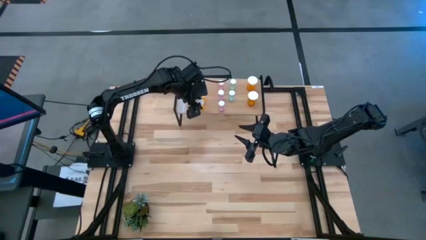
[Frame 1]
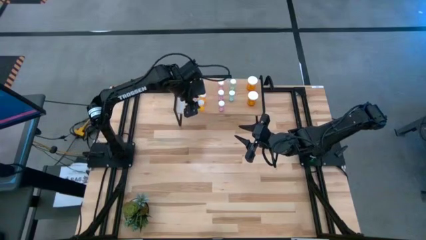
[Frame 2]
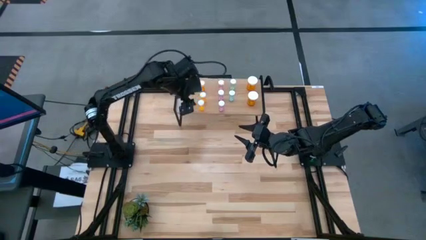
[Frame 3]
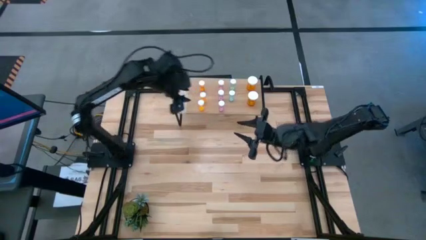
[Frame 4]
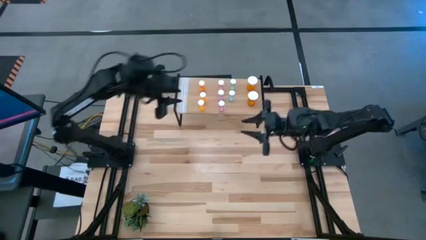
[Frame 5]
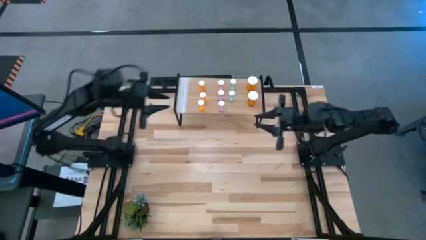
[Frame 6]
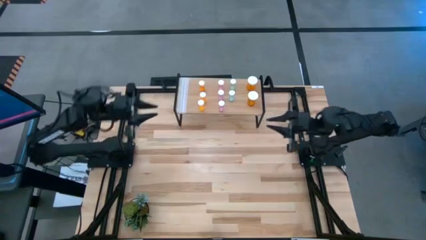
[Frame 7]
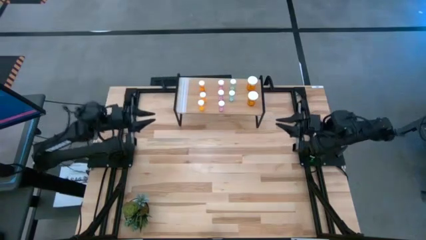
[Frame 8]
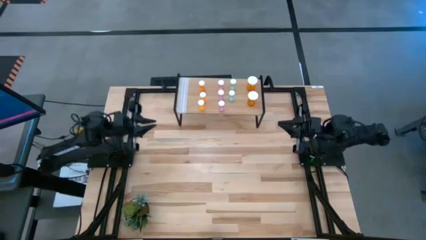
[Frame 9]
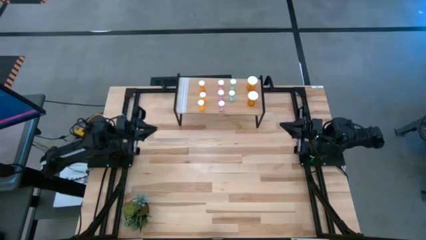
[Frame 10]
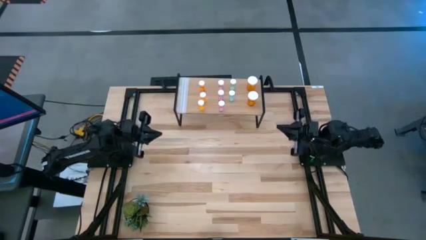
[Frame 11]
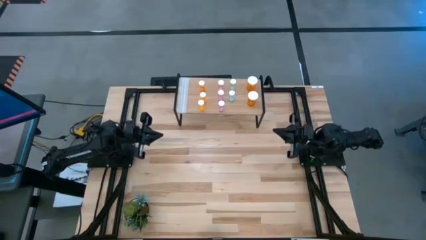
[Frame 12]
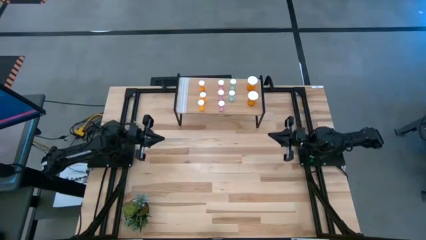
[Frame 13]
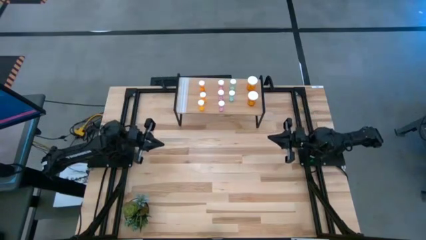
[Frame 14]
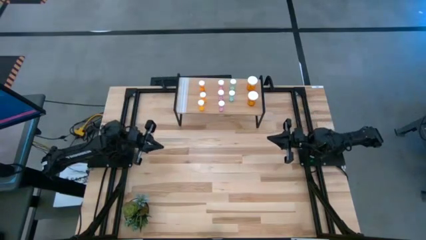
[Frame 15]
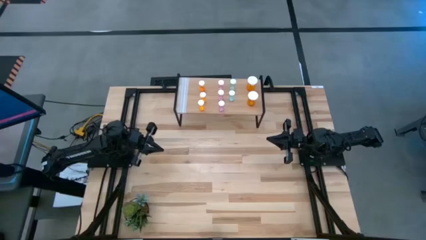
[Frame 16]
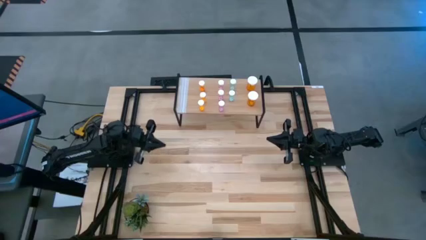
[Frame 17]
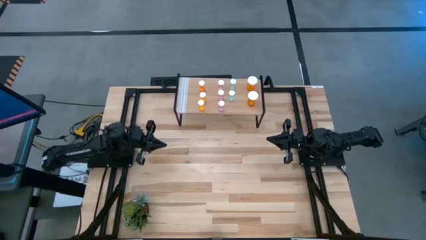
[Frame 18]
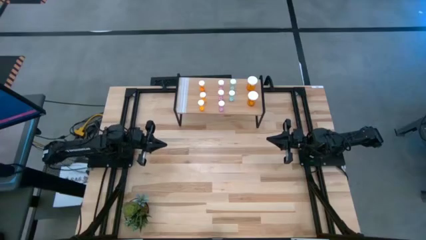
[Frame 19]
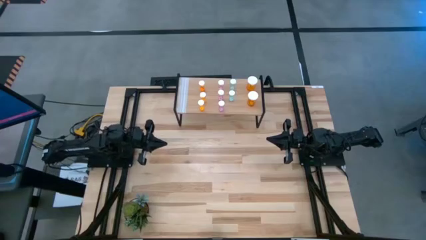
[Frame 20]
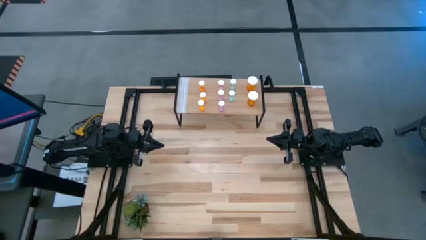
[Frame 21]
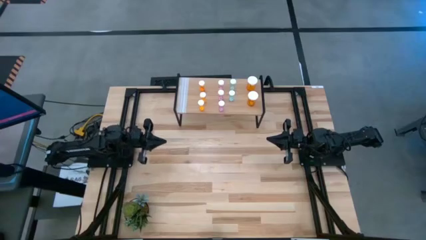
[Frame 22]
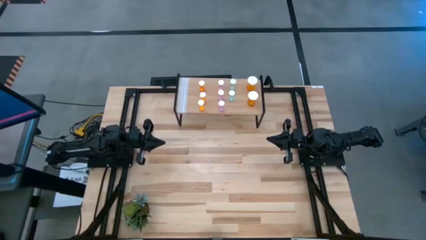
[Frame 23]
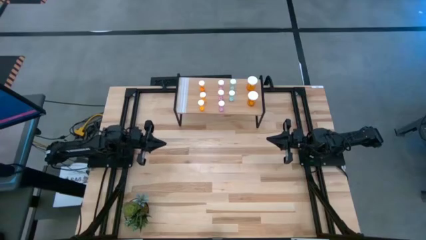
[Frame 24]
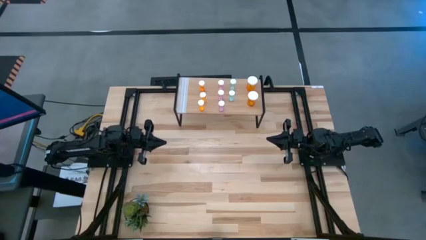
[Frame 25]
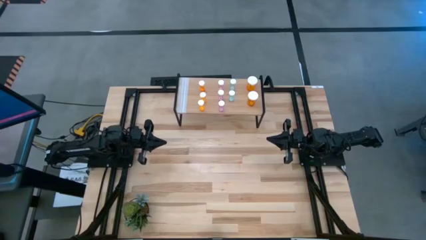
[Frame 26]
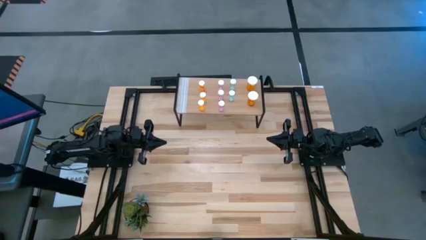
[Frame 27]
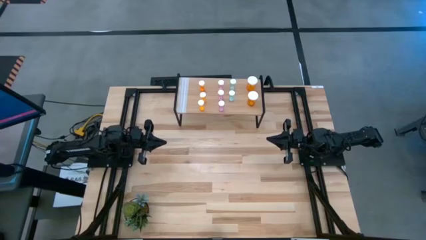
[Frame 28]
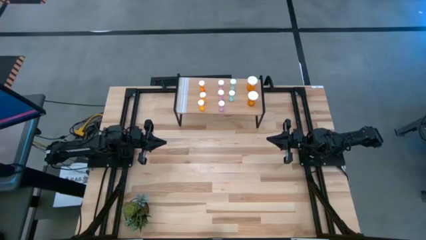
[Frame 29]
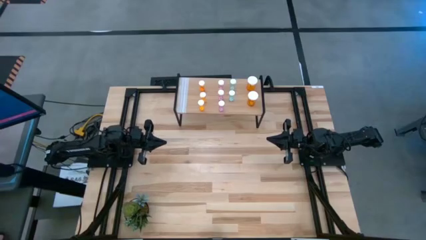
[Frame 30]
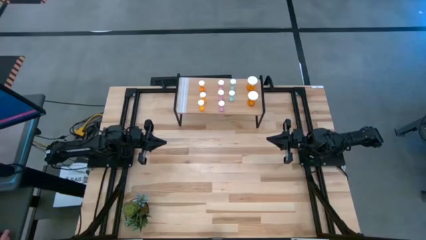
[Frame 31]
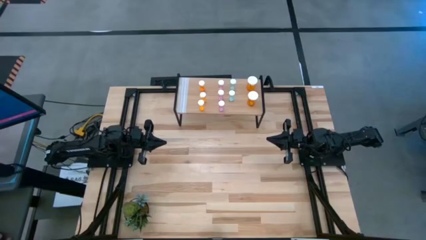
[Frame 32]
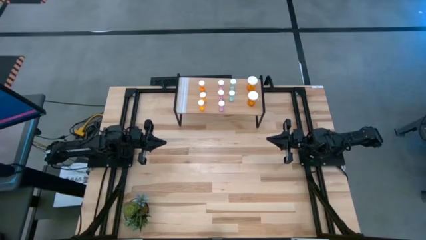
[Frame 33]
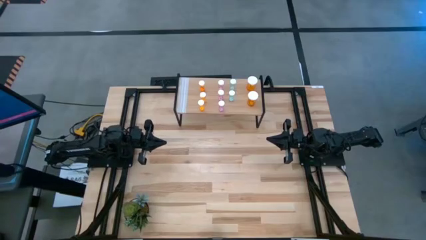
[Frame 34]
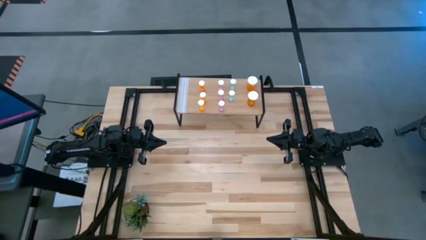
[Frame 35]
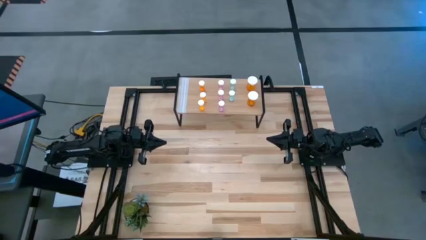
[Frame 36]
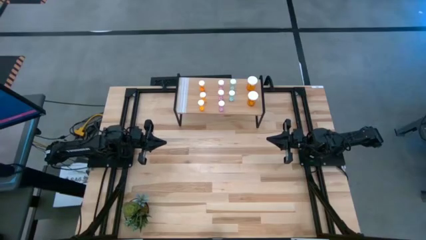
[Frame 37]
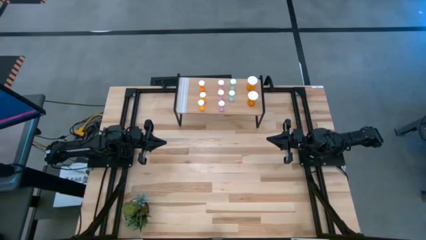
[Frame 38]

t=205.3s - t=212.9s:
Task: Pick and place medicine bottles onto shelf by color
Return to Home Position

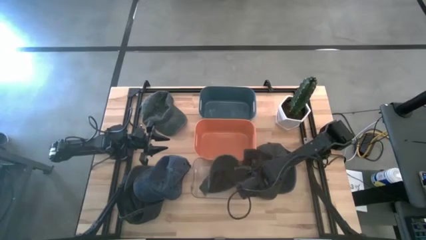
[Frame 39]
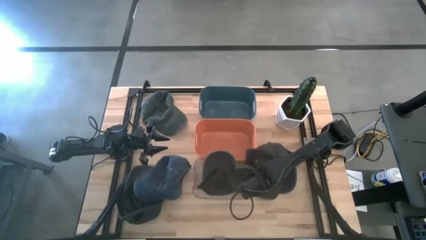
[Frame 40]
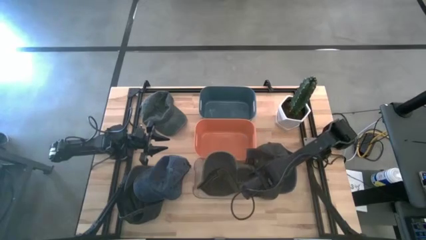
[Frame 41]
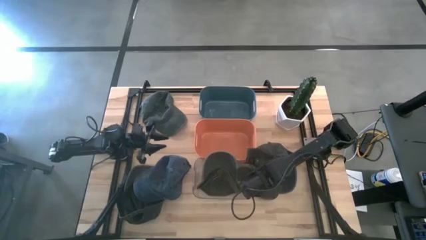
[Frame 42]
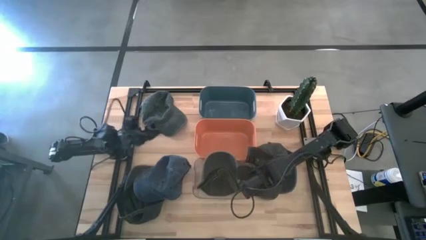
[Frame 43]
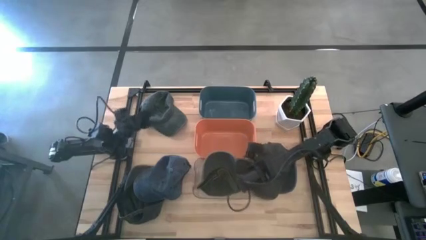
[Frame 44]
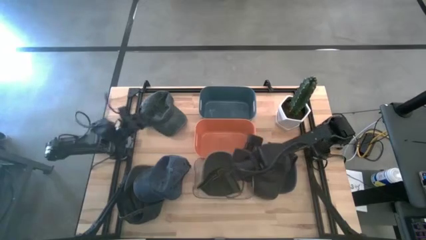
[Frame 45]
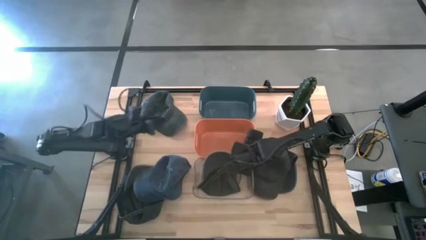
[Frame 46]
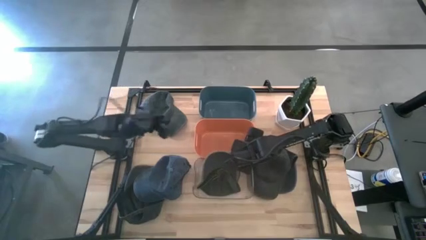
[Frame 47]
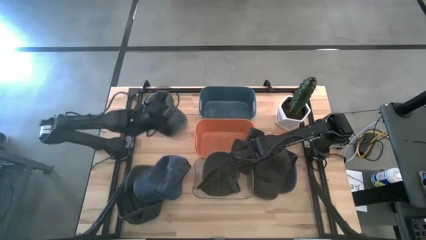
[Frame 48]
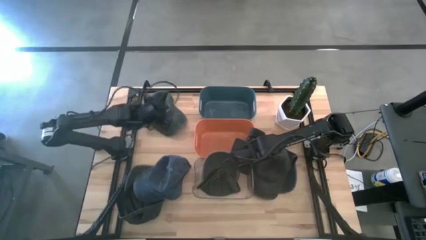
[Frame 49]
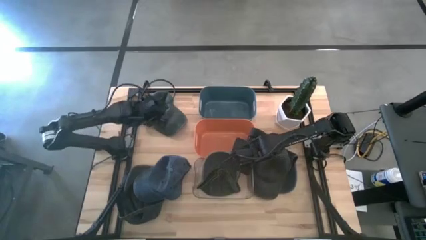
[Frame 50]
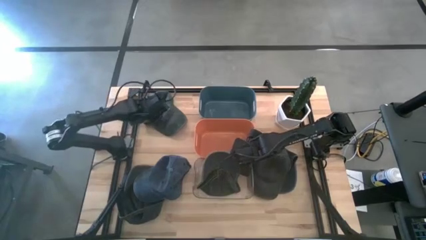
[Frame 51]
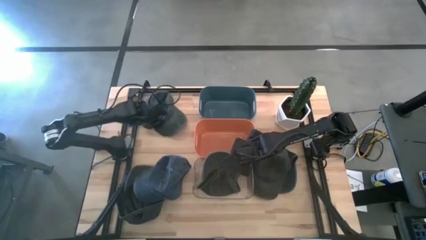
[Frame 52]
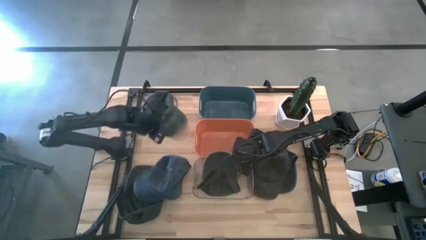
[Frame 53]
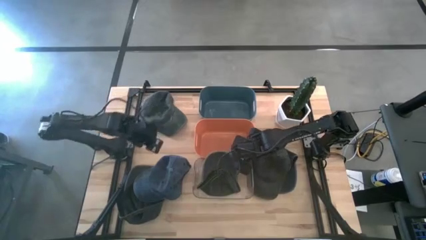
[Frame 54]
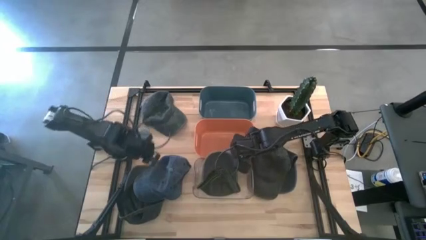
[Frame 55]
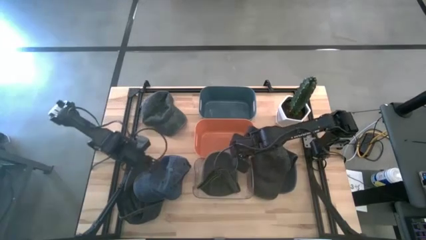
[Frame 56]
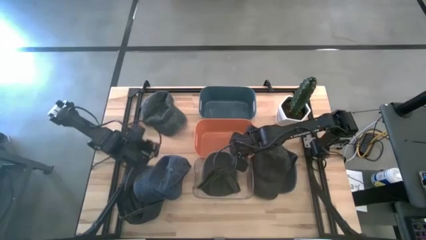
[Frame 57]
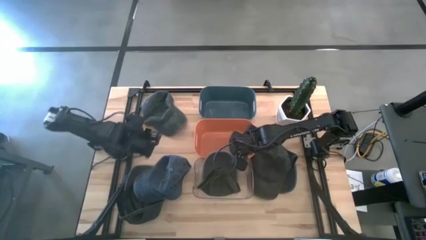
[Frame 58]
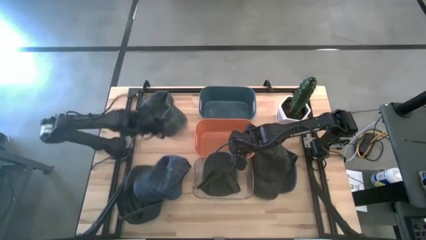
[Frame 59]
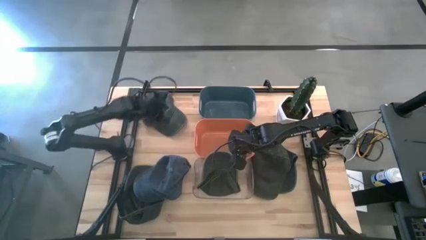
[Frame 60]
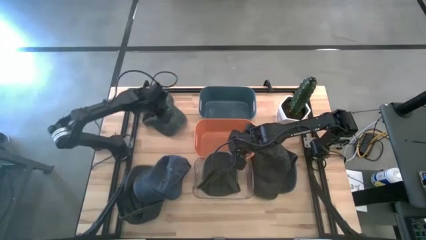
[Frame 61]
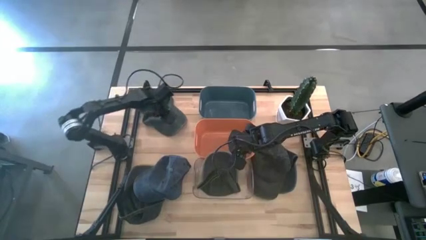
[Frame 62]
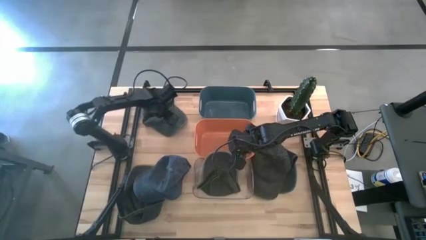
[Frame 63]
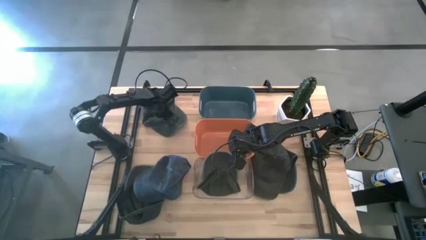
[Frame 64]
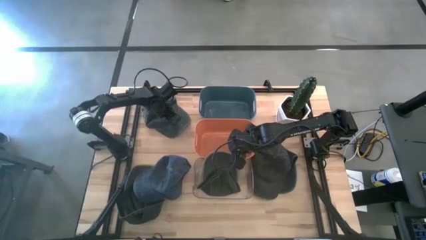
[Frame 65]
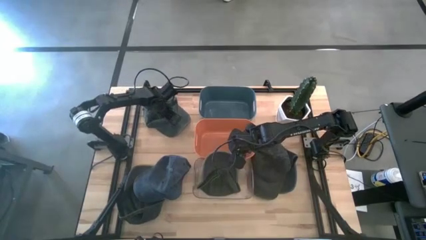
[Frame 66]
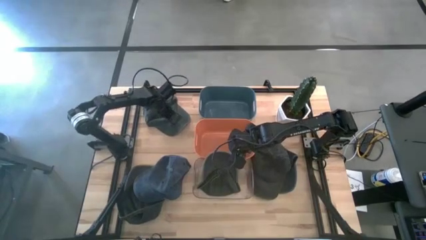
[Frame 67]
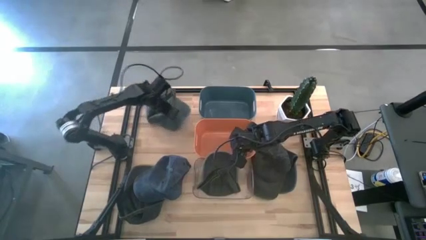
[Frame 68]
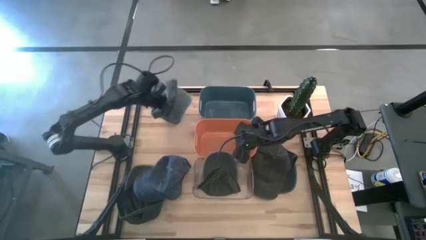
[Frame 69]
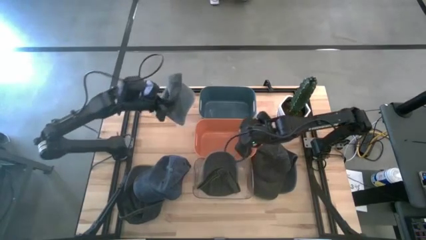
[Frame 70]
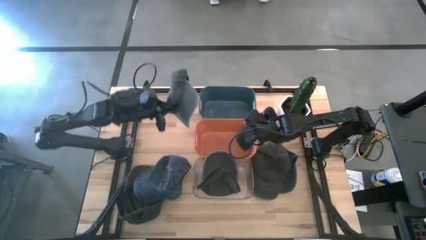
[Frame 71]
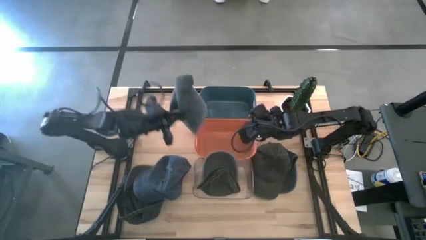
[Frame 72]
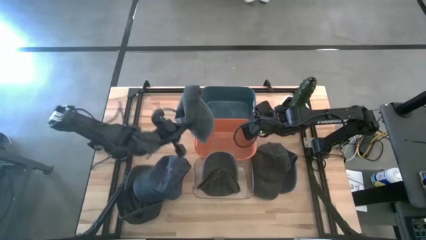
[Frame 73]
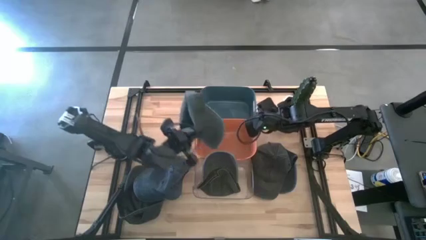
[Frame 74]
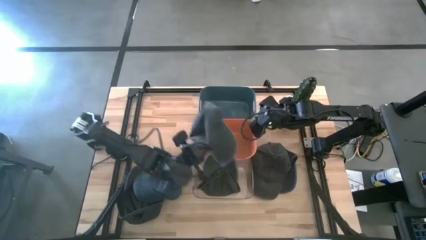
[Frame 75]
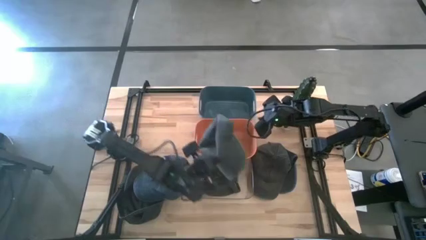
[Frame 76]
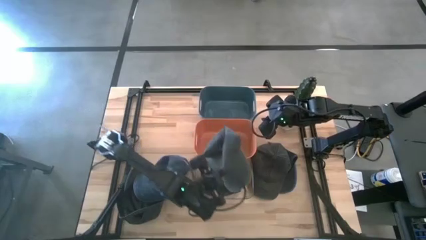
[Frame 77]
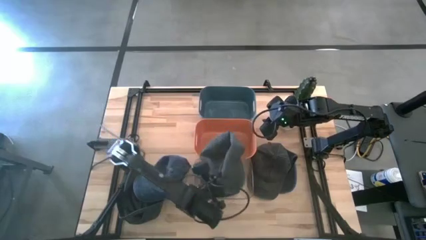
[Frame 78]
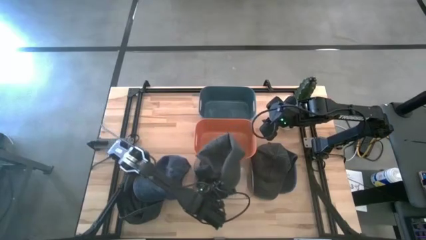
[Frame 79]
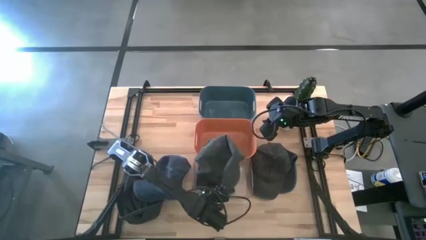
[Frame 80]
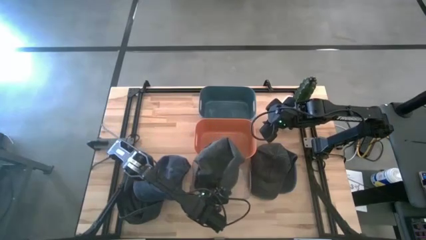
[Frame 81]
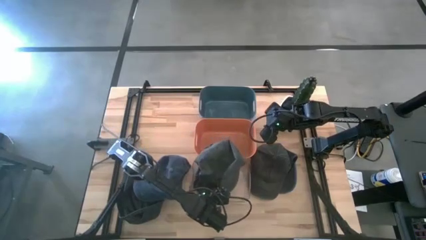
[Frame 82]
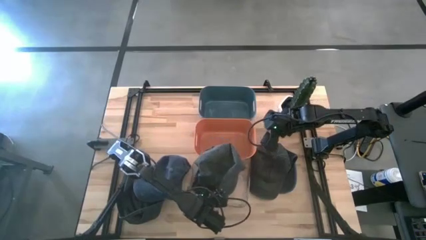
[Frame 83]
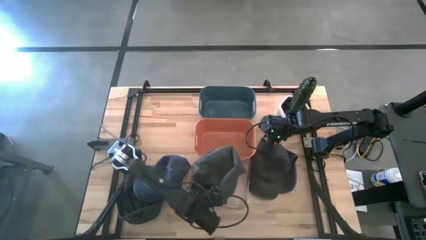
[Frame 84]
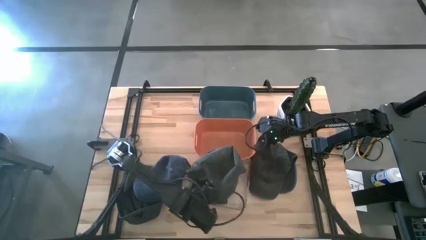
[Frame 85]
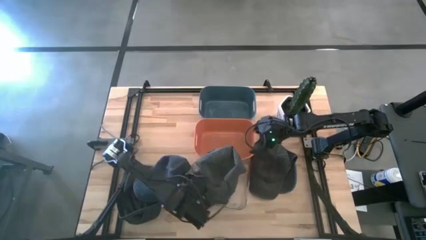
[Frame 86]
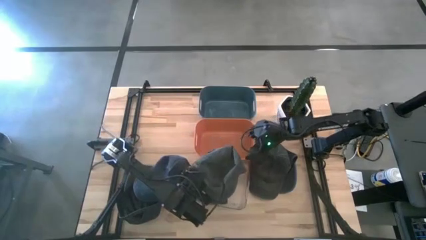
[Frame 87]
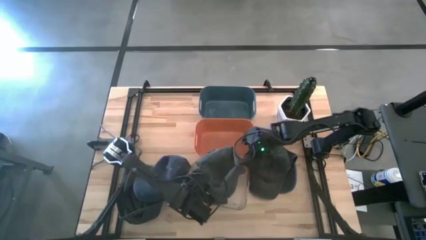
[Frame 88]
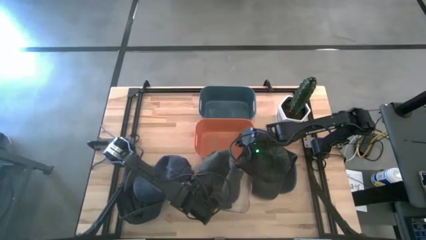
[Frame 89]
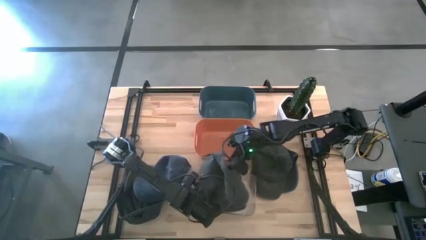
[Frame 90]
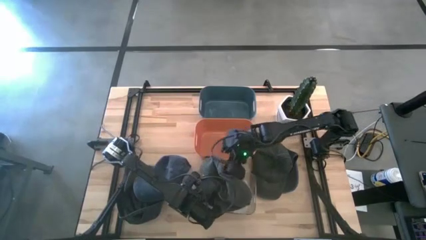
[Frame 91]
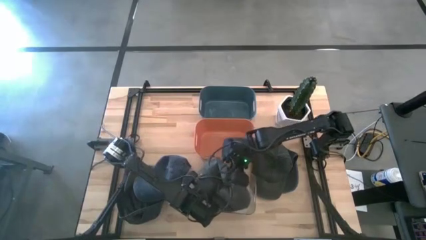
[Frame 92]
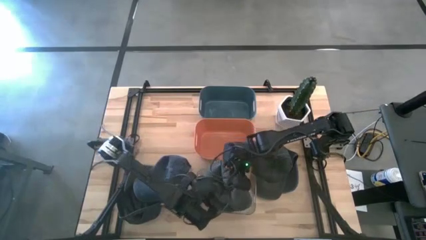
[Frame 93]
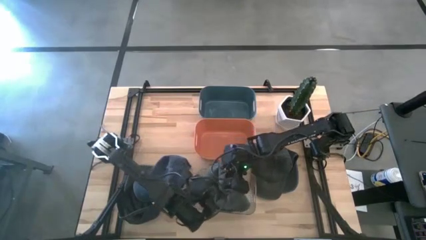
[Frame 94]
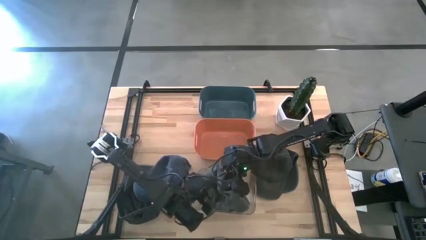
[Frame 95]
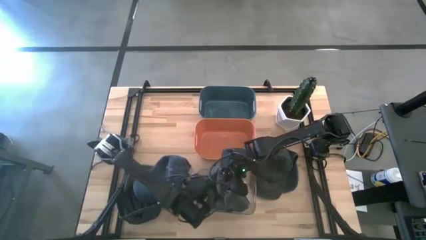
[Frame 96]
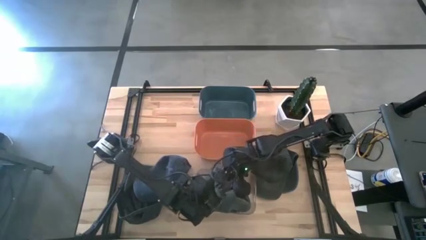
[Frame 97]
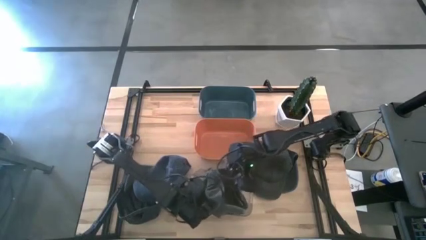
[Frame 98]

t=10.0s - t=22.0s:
Task: Pick & Place hat
Put the gray cap into the transparent bin
